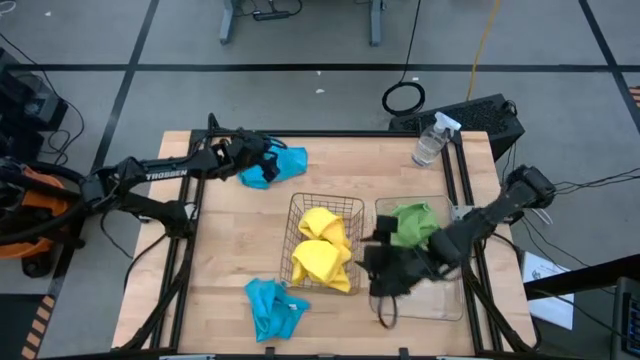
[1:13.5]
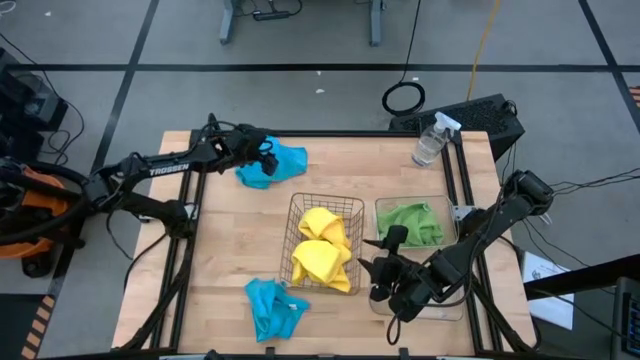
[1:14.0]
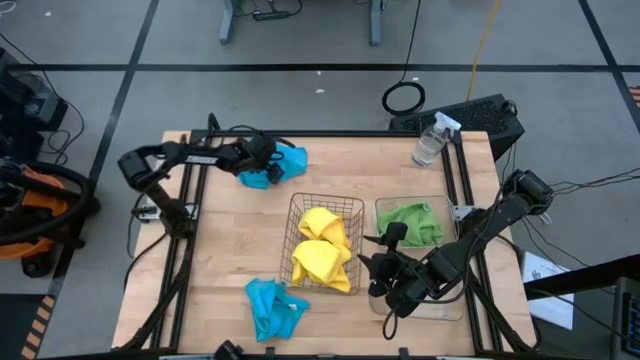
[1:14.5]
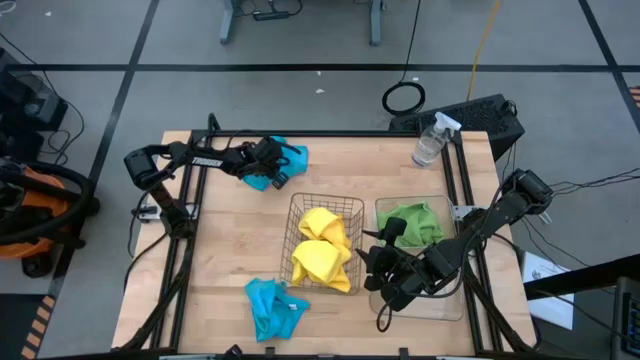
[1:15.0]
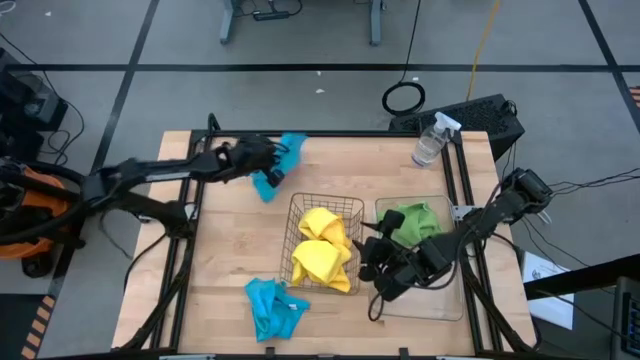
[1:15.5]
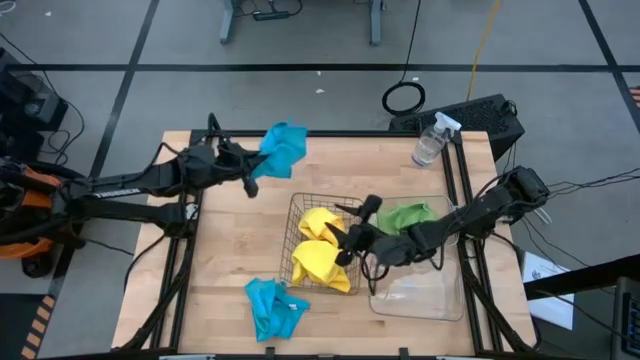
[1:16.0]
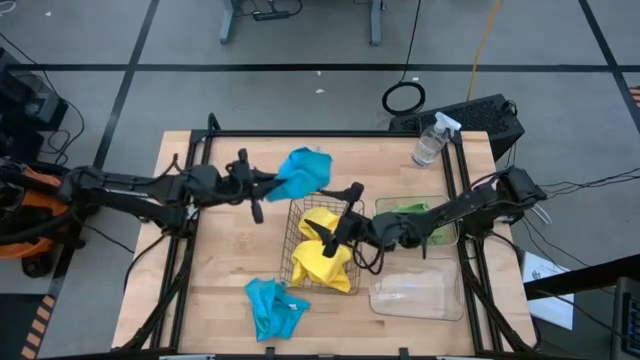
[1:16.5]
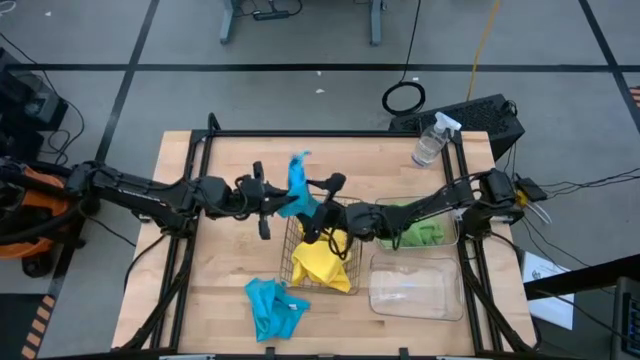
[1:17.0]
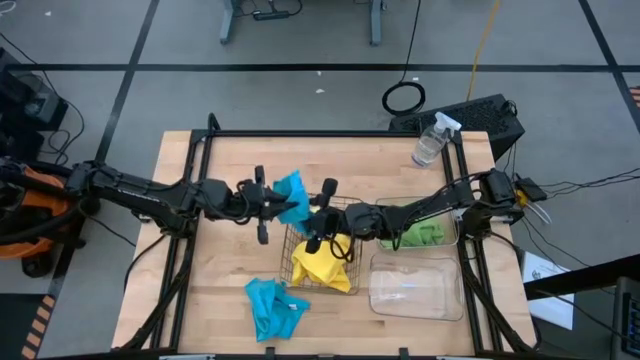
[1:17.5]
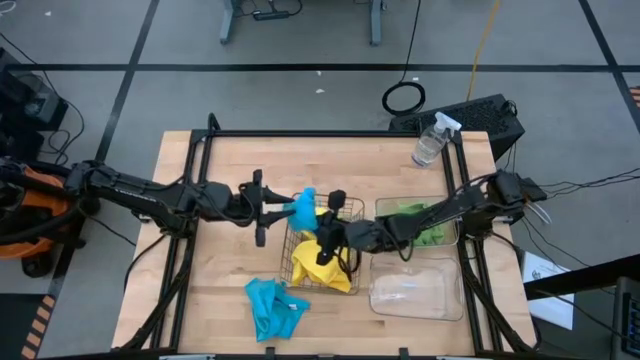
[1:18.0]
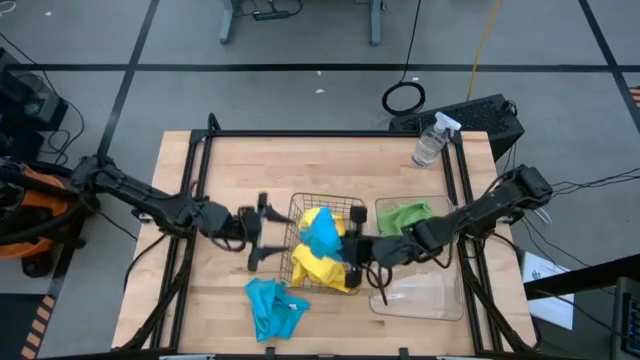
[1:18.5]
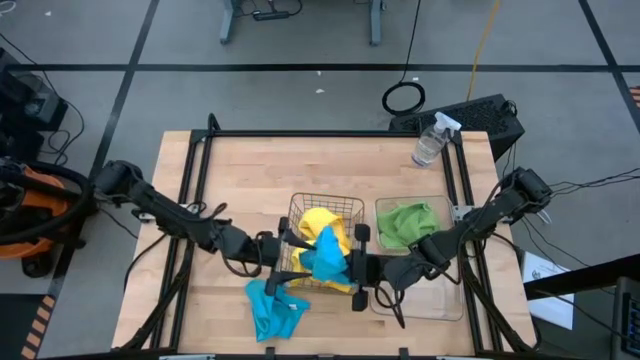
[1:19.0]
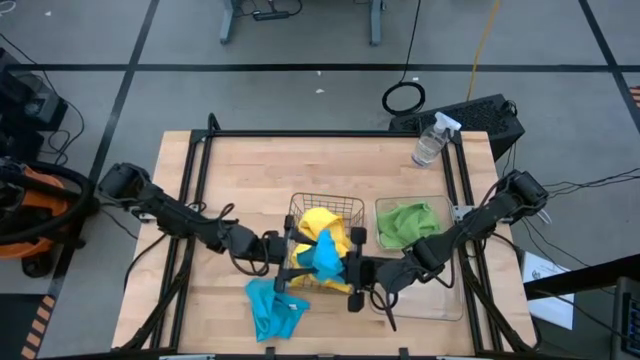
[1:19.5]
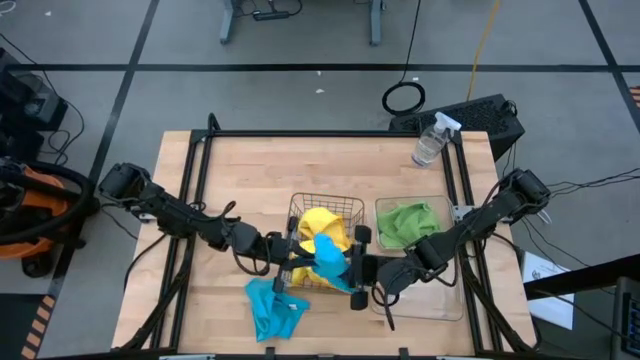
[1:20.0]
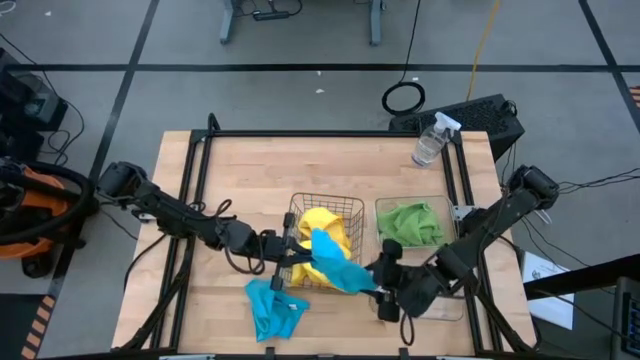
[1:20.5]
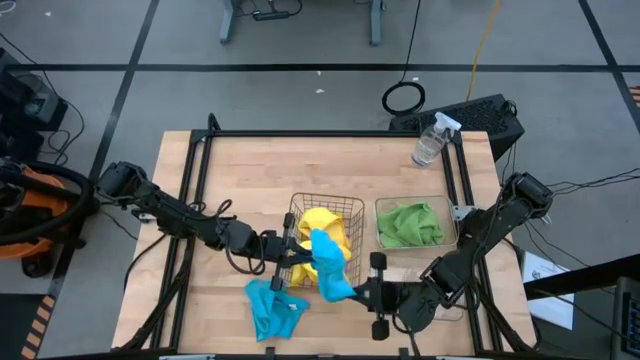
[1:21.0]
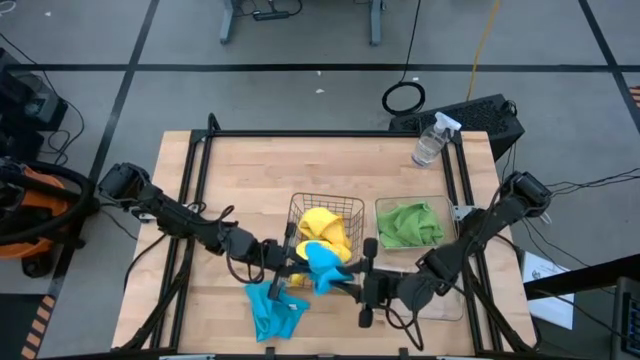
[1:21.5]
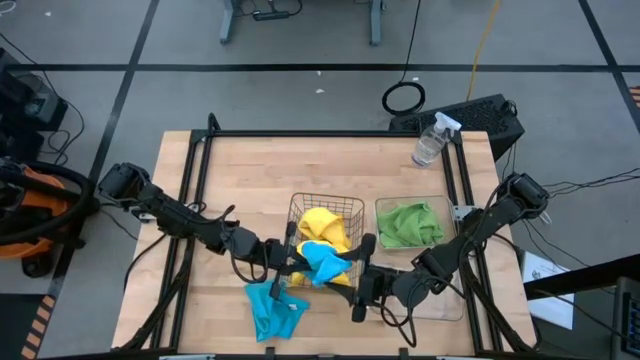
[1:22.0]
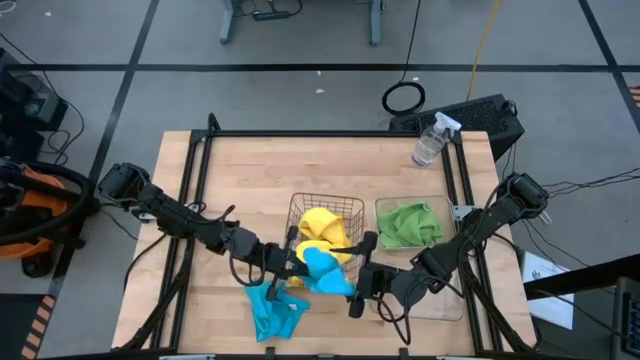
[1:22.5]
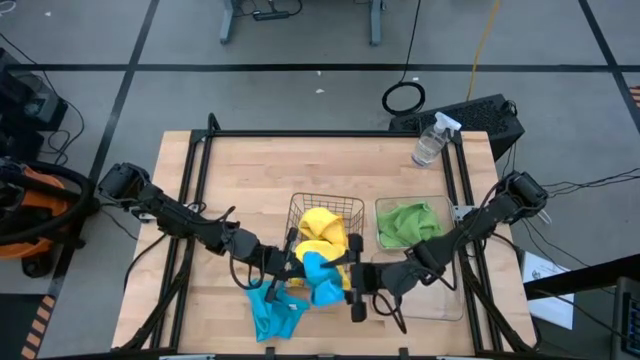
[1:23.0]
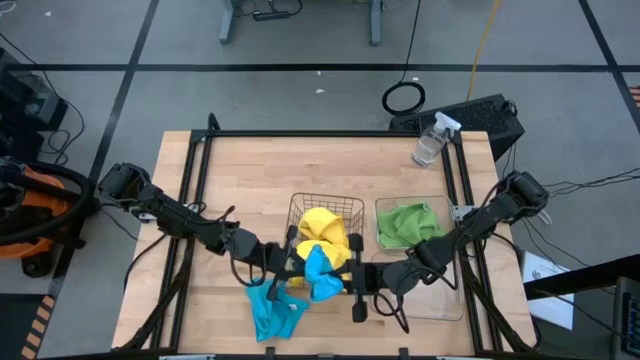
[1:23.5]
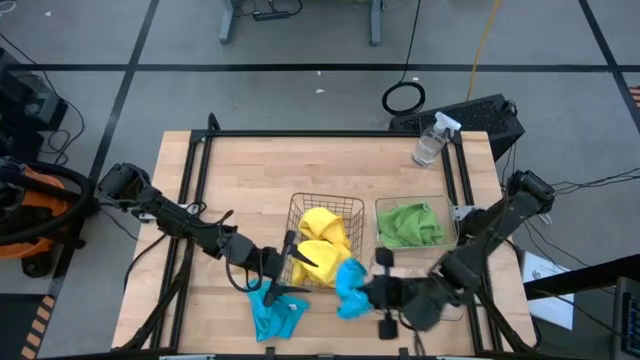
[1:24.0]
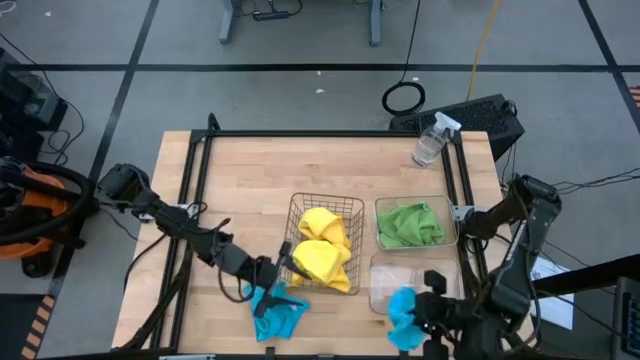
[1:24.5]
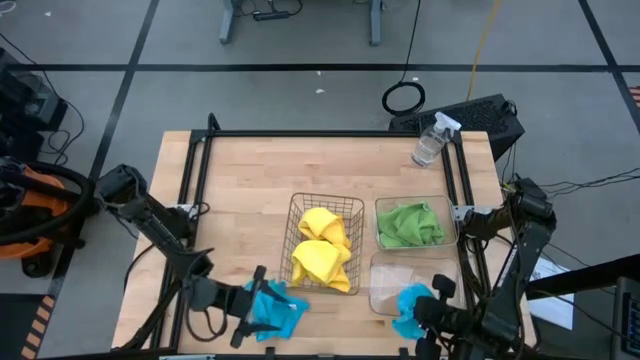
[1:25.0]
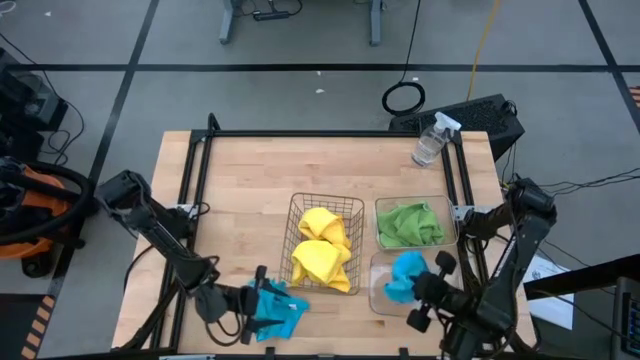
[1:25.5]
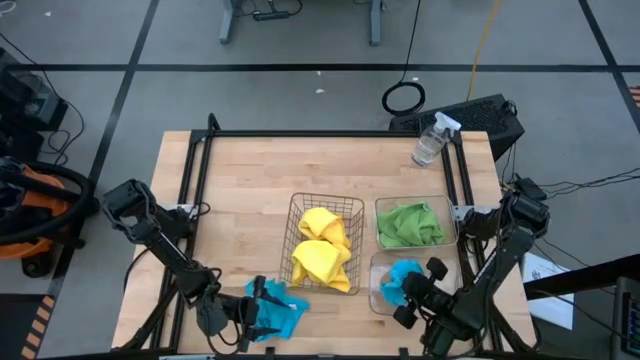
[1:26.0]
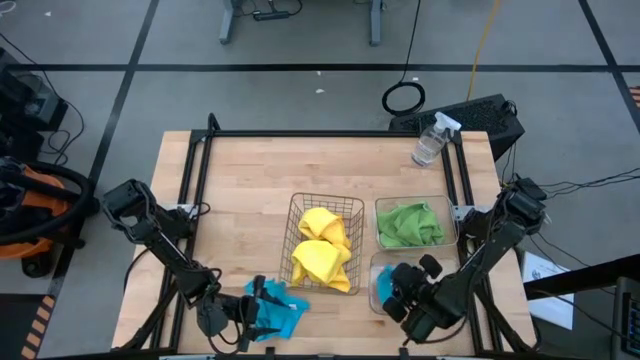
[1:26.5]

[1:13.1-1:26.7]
Task: Sort microfiber towel by color & place in baskets
Put the top blue microfiber cloth into the bottom transparent bin

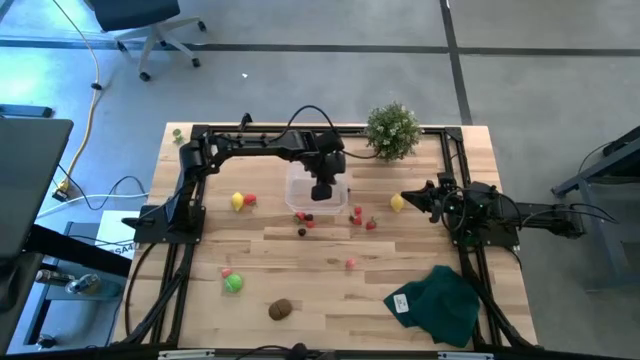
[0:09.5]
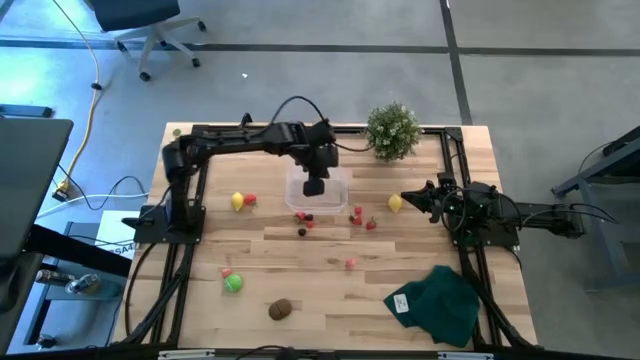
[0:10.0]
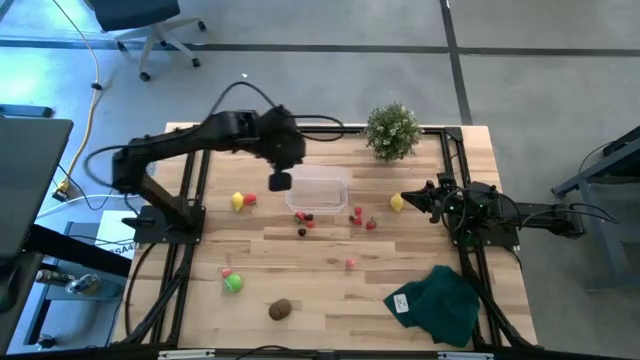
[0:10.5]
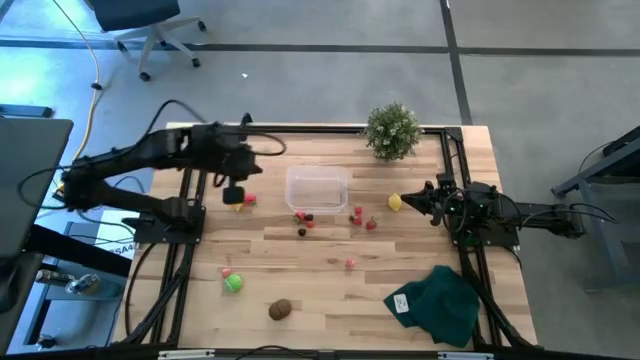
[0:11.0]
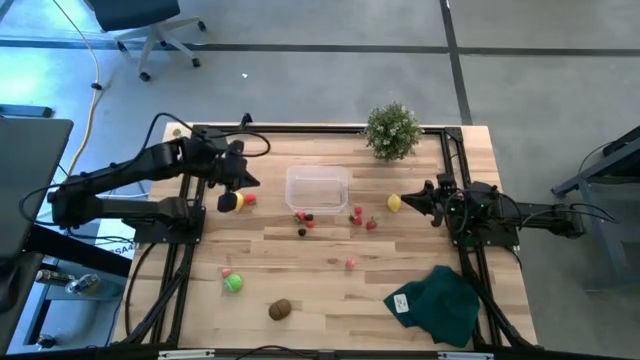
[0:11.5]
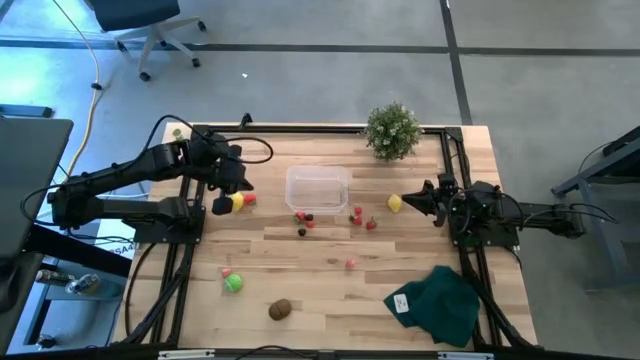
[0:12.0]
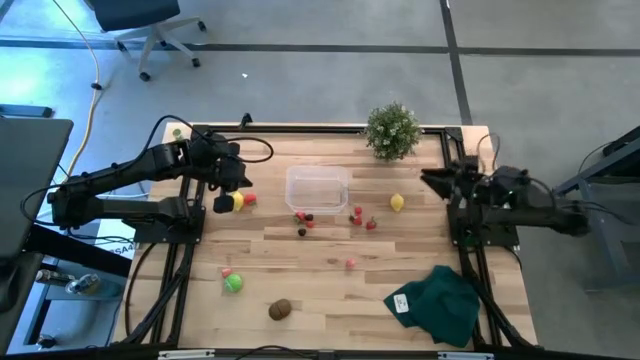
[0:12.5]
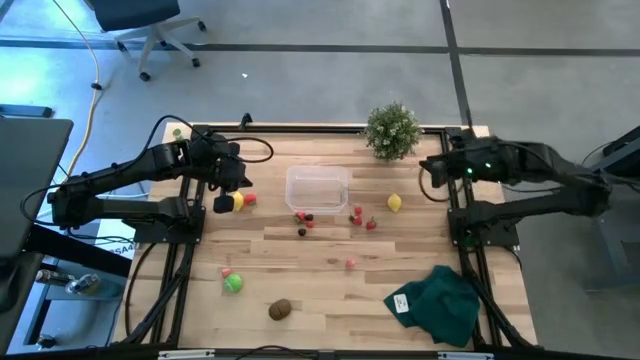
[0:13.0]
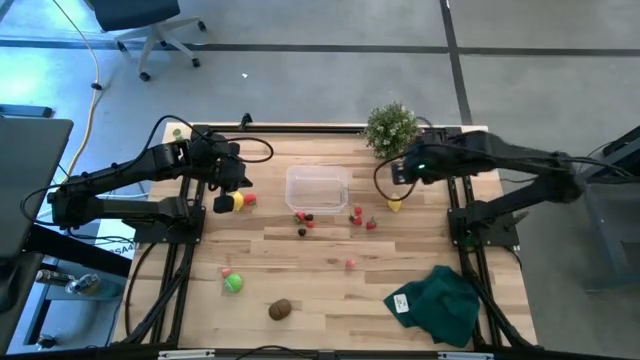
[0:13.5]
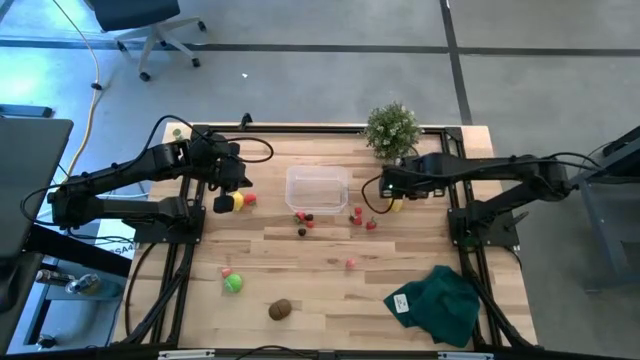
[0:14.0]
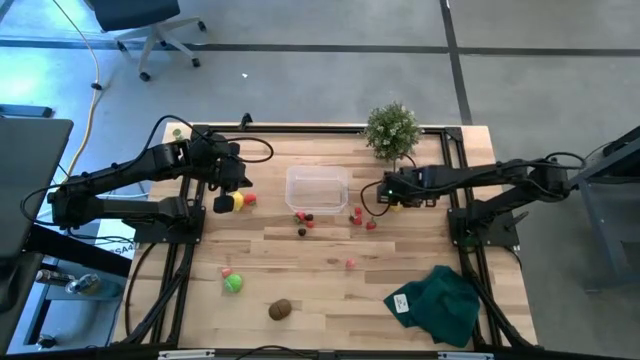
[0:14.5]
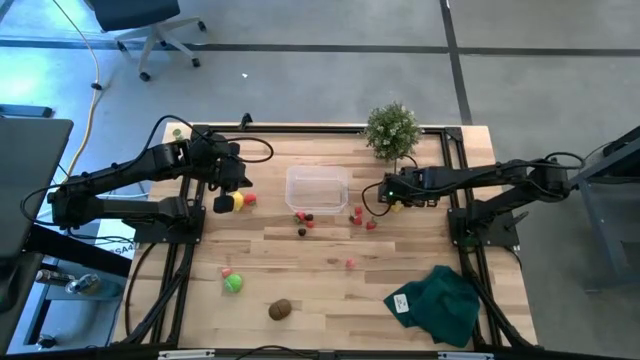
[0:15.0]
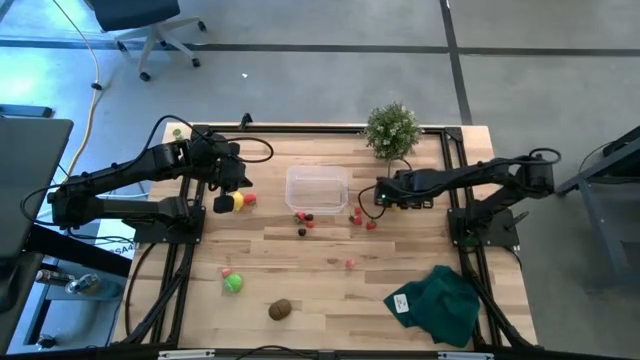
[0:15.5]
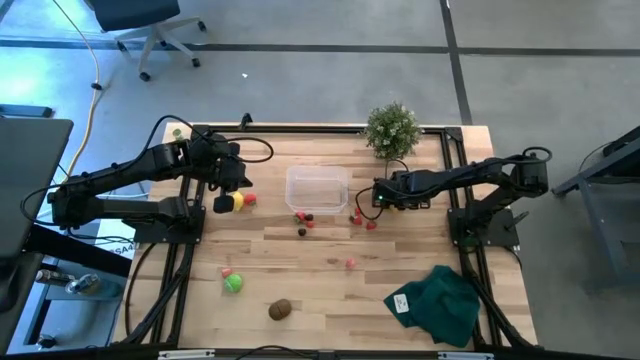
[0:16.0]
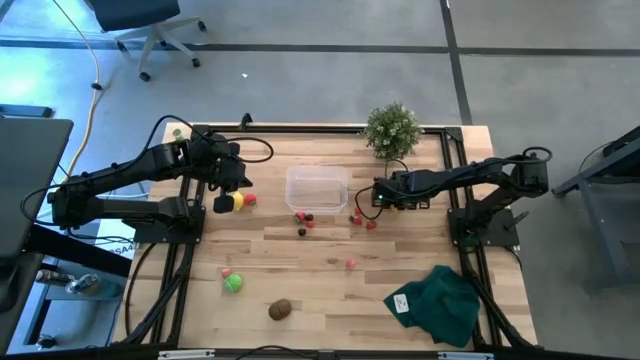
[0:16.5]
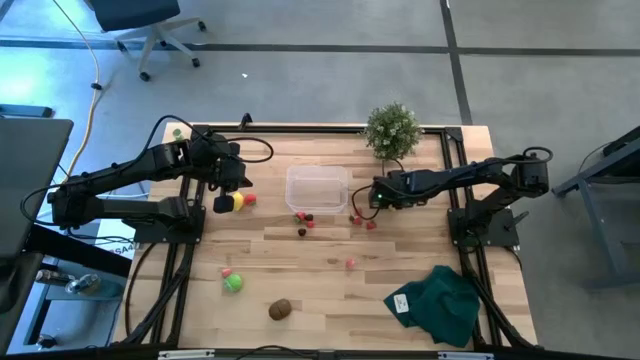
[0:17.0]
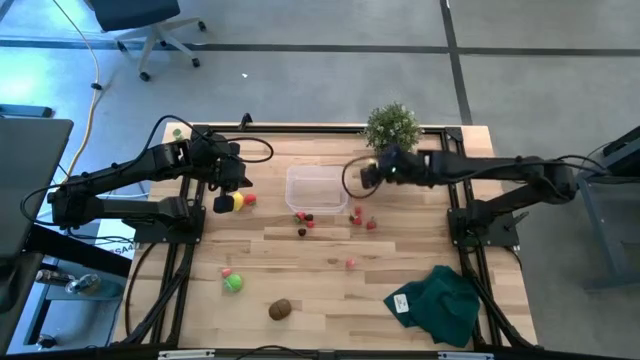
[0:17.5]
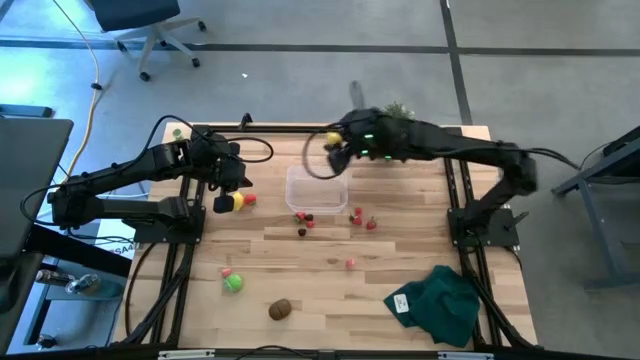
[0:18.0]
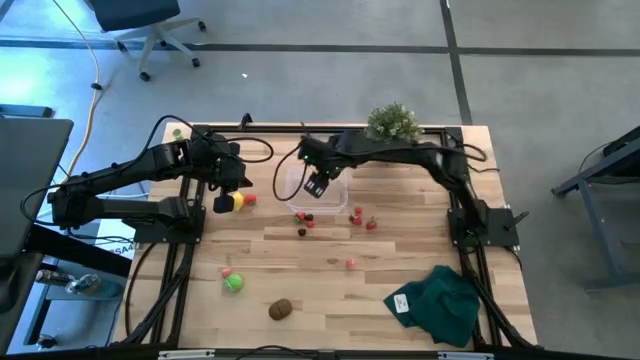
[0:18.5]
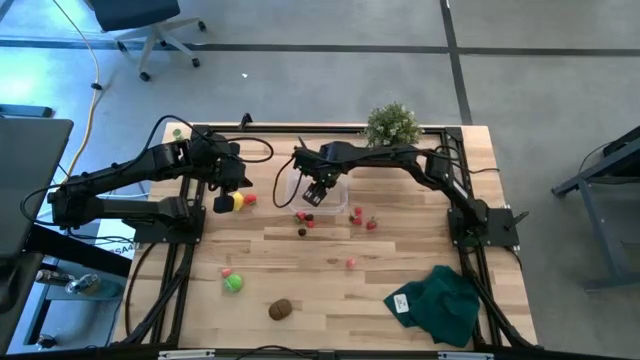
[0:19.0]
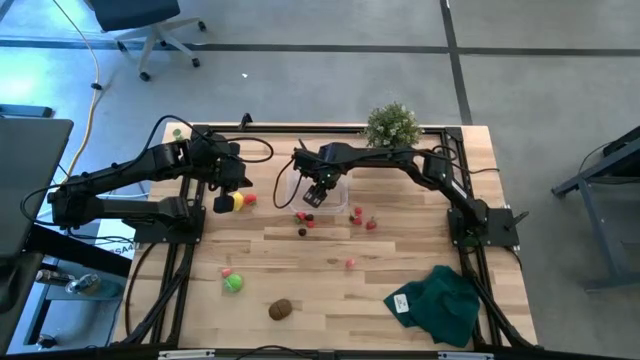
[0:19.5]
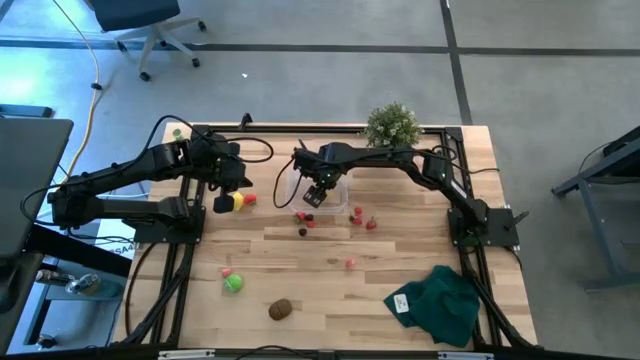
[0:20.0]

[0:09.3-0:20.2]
Task: Pick and placing Produce into tupperware
Put the yellow lemon into the transparent bin
